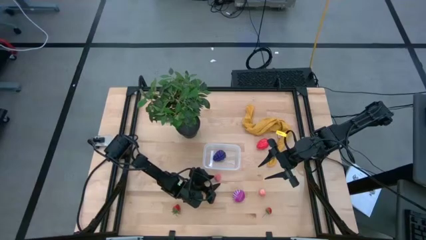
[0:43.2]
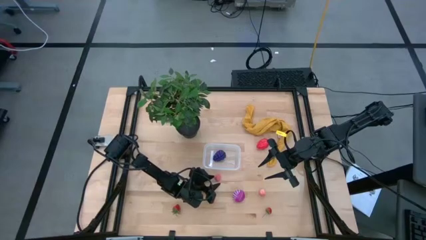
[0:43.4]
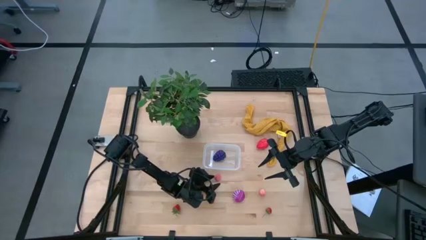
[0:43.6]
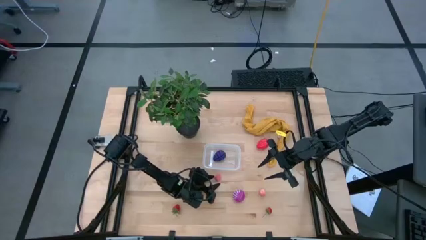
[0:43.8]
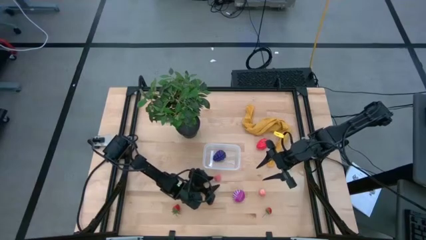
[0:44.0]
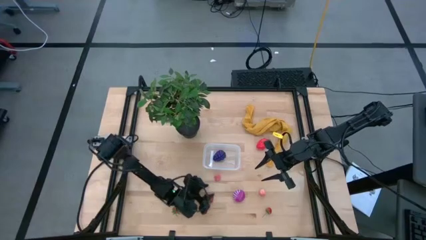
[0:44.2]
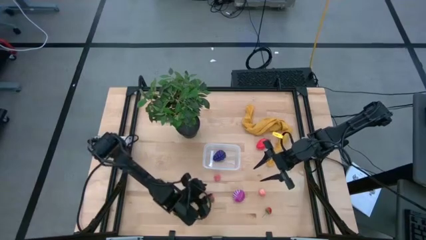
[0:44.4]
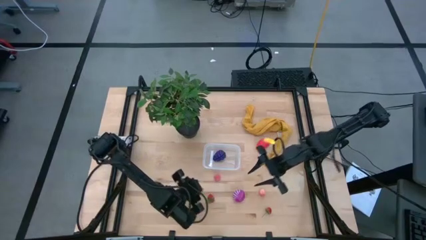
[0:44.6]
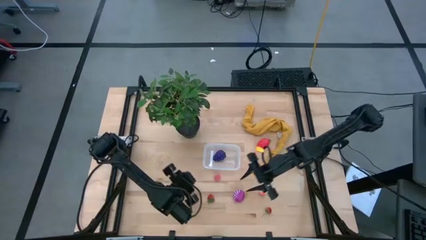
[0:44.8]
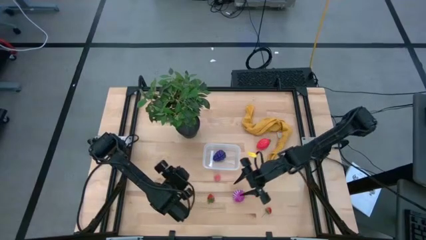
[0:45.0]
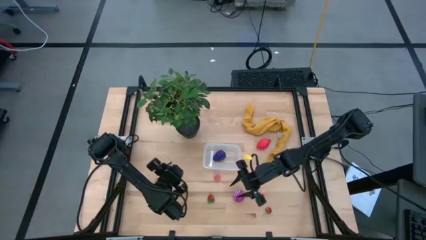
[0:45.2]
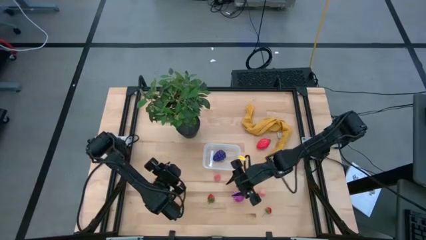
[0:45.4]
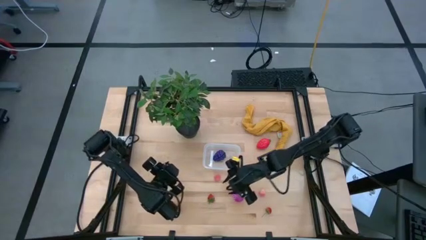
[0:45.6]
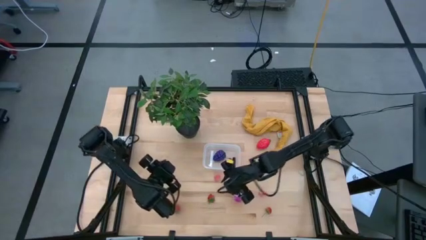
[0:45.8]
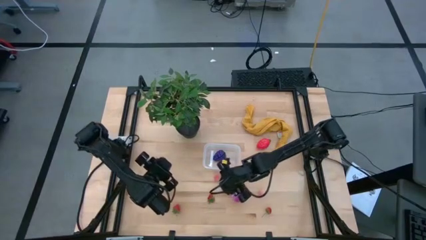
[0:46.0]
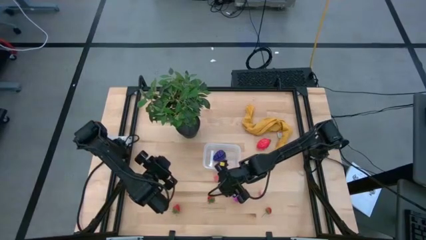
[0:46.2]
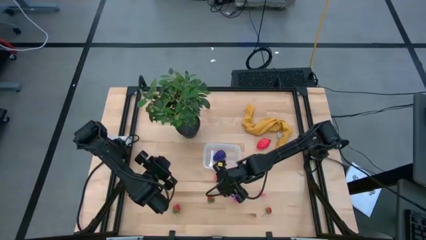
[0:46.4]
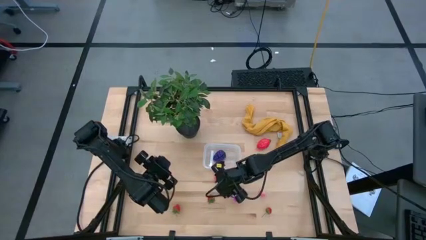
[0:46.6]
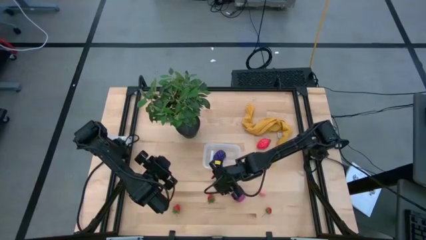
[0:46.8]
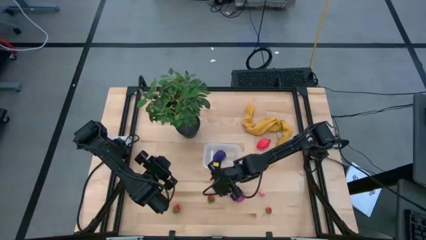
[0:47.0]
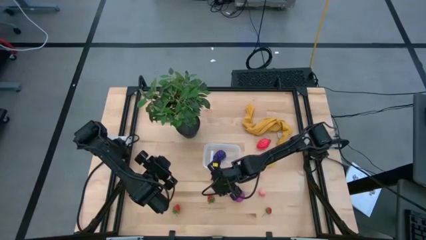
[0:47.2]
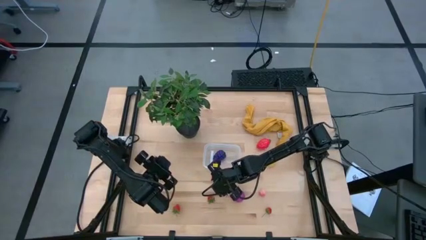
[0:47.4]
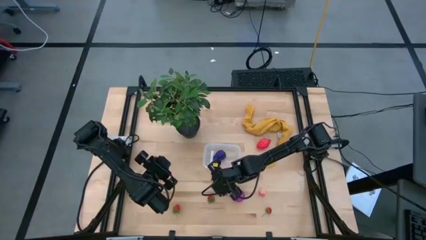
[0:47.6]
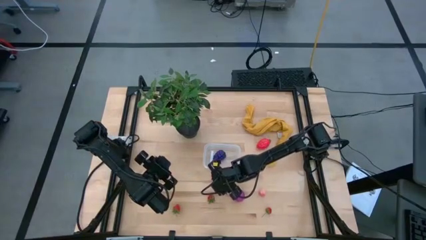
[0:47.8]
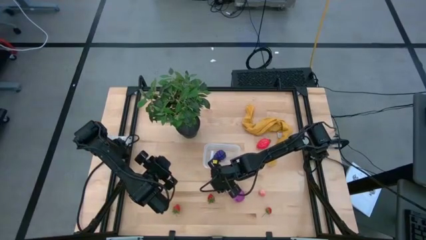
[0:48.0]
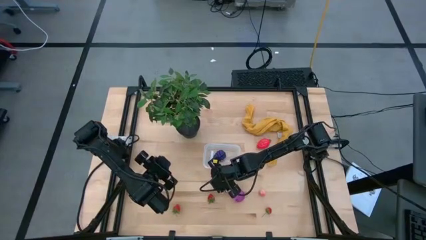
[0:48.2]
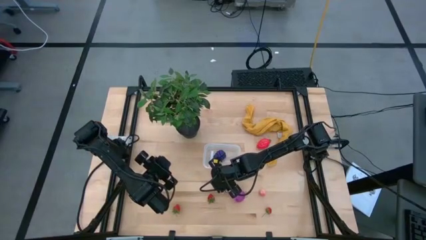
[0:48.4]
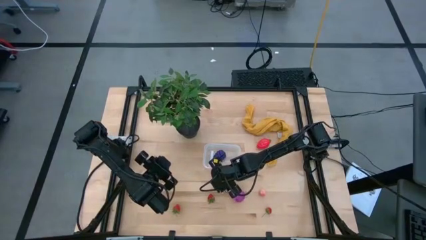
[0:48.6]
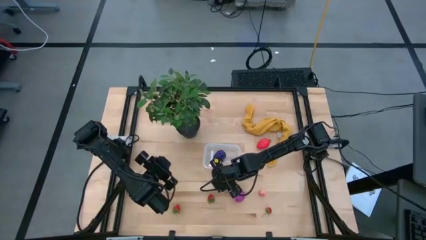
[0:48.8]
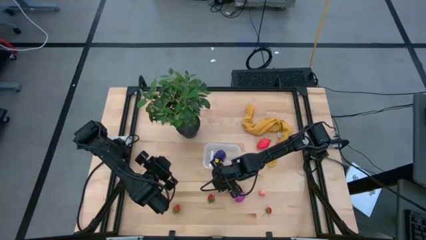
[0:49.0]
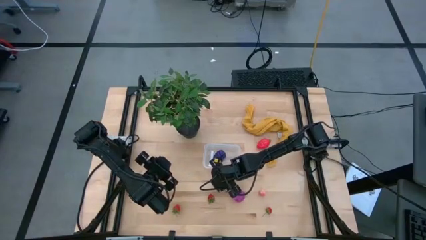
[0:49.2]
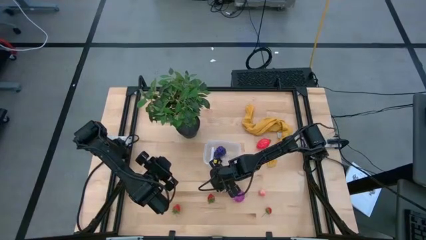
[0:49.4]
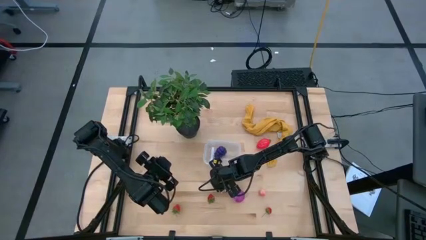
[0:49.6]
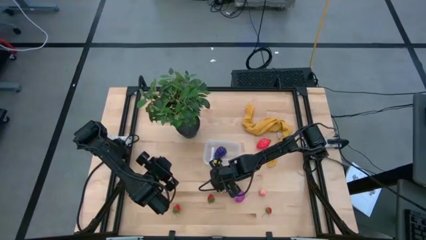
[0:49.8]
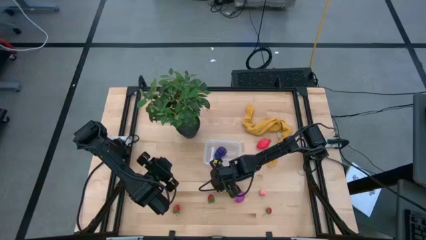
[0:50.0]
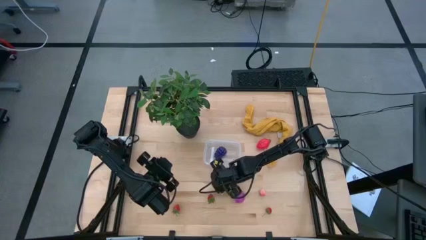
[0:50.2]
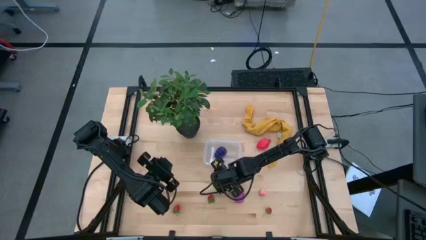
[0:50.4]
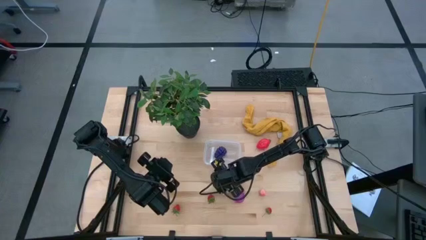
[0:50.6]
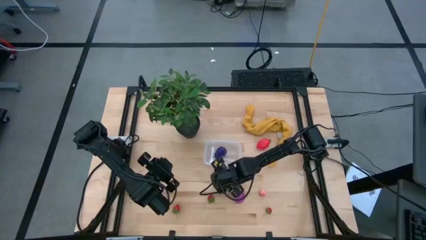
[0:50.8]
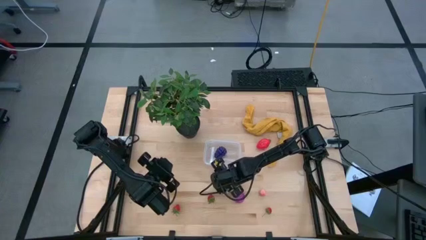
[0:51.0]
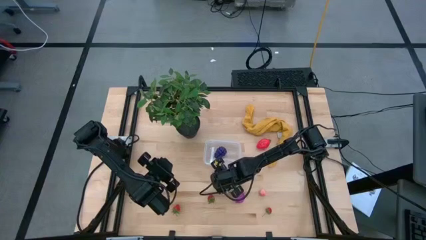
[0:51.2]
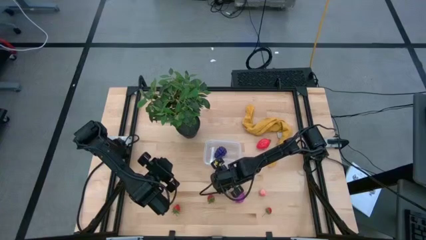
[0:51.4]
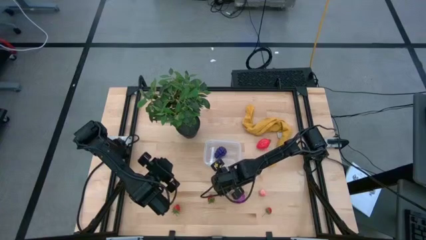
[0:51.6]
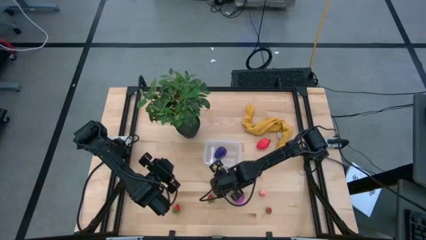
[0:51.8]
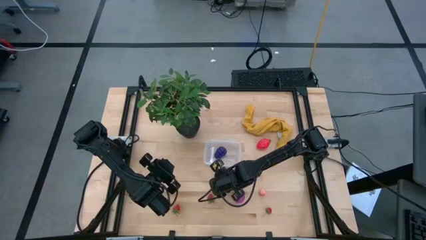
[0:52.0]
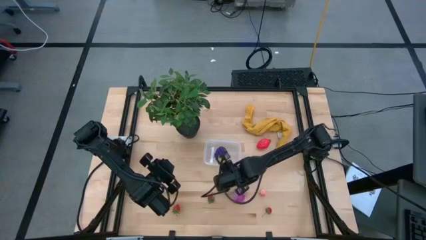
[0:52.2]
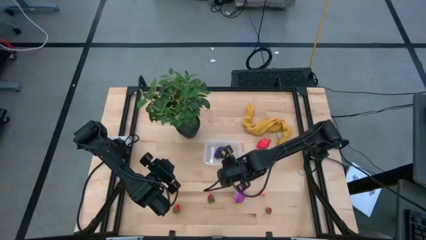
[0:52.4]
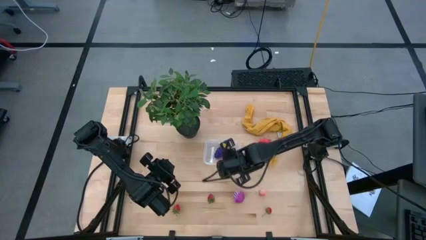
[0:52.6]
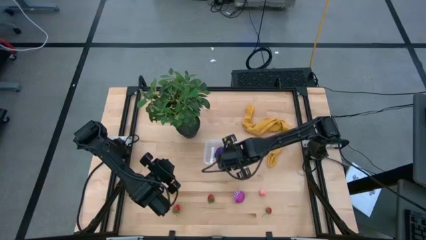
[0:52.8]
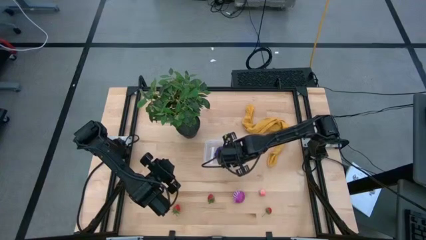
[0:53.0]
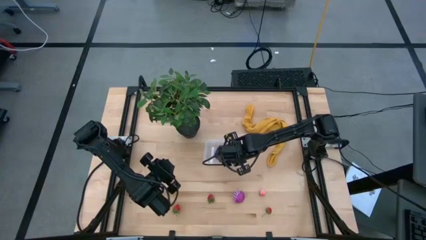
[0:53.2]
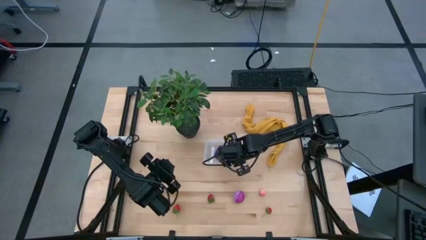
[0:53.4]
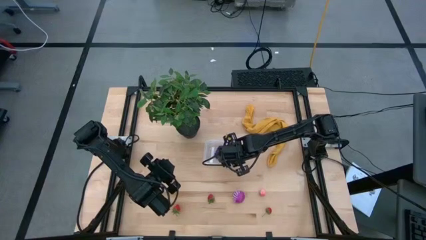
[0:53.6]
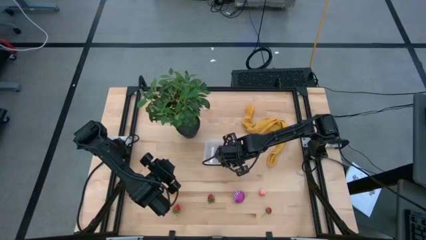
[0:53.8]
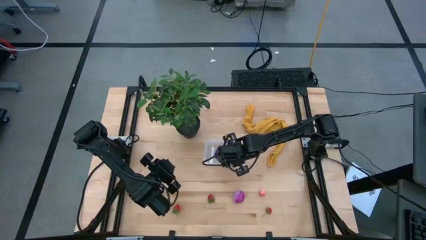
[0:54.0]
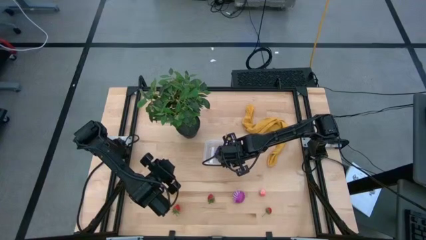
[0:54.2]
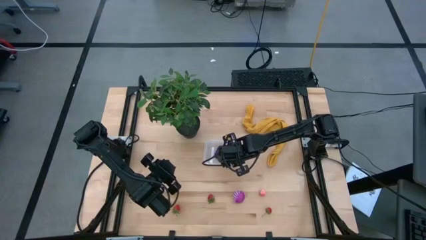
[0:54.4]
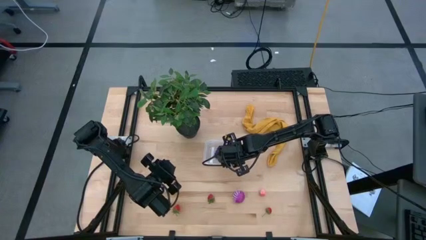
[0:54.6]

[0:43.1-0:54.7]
Task: Pick and placing Produce into tupperware
Put the top peach into the bin

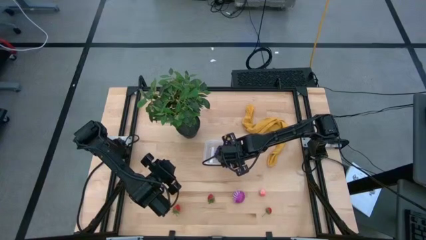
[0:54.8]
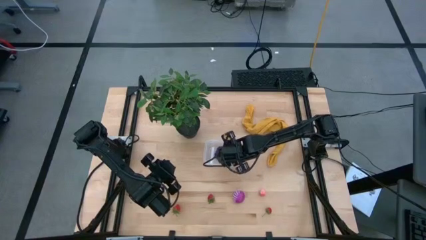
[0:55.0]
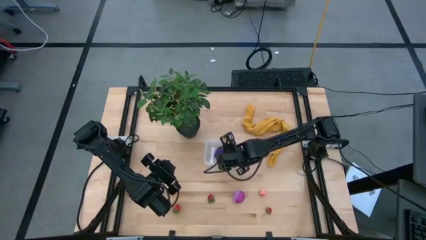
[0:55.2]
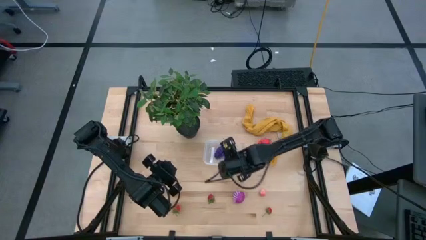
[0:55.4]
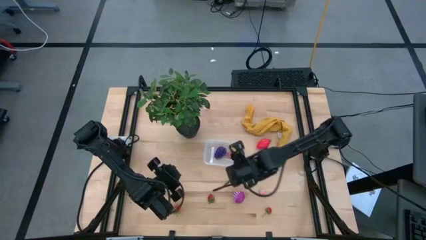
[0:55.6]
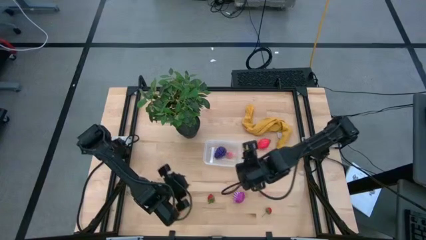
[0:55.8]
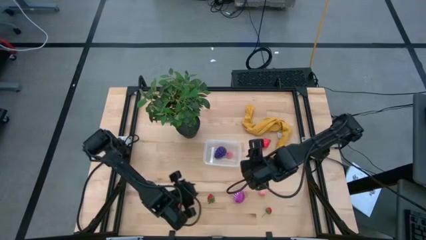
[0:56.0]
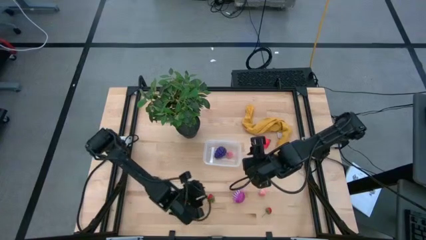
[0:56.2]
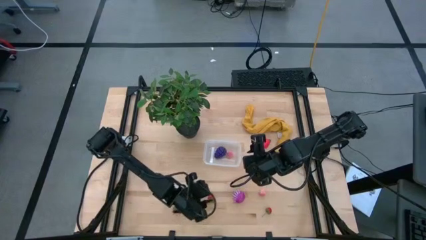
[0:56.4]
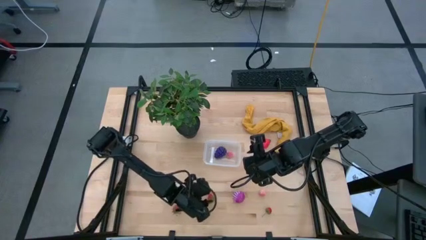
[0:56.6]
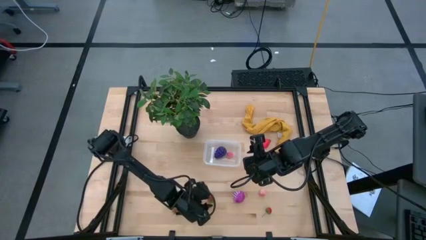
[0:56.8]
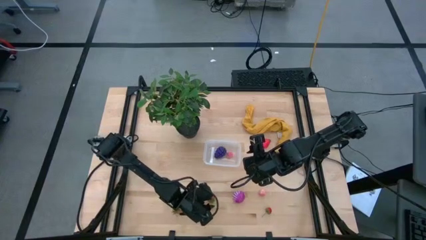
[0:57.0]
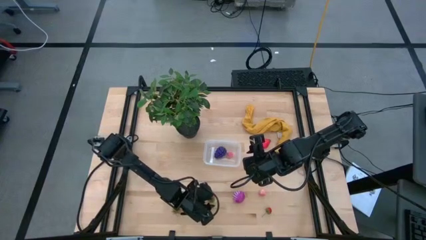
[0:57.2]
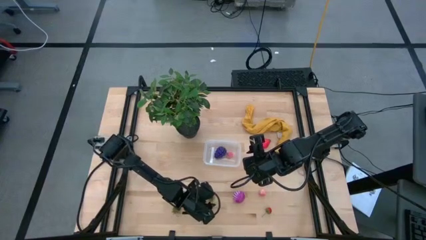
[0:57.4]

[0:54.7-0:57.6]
Put the middle strawberry into the bin
